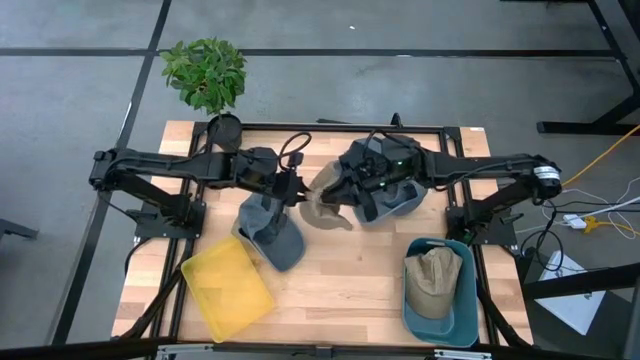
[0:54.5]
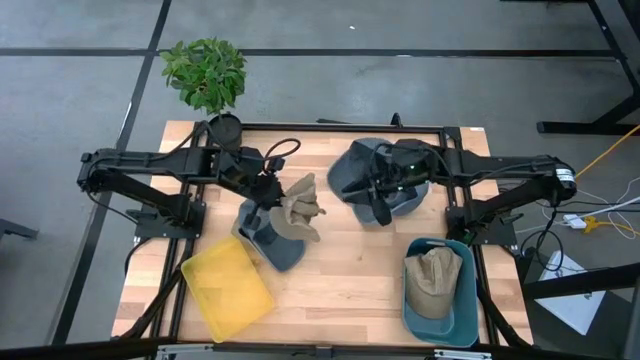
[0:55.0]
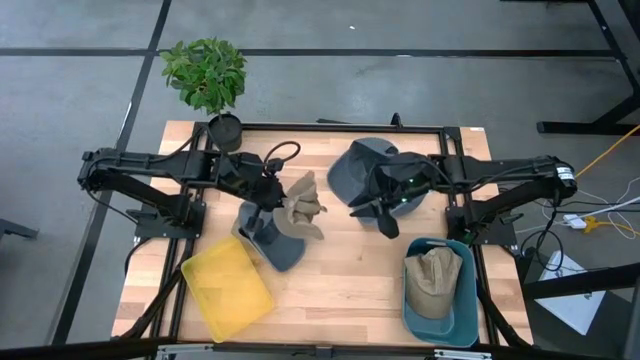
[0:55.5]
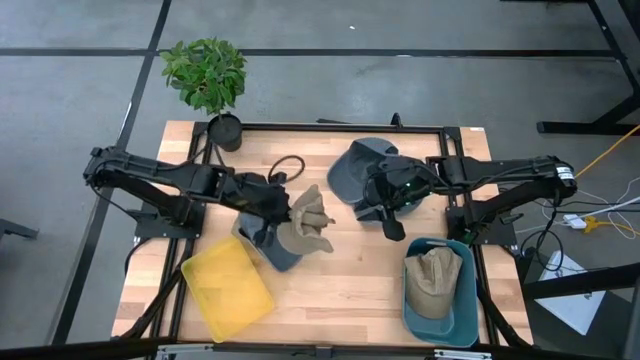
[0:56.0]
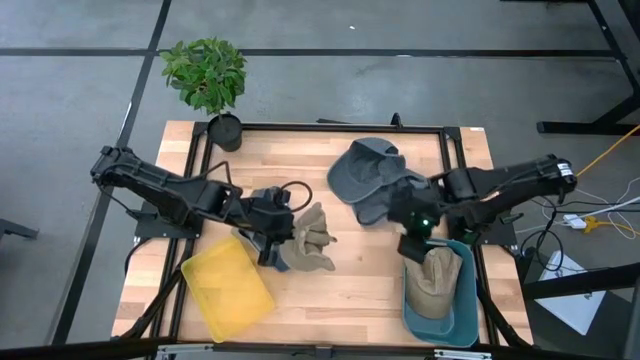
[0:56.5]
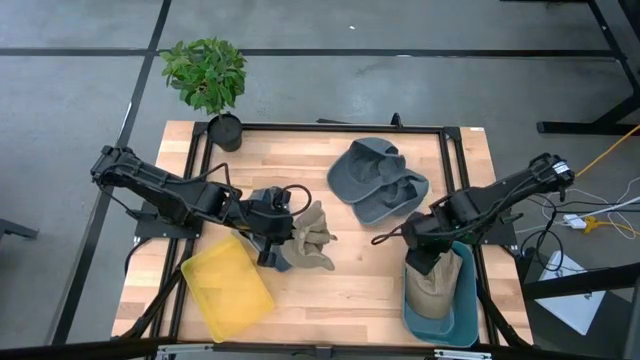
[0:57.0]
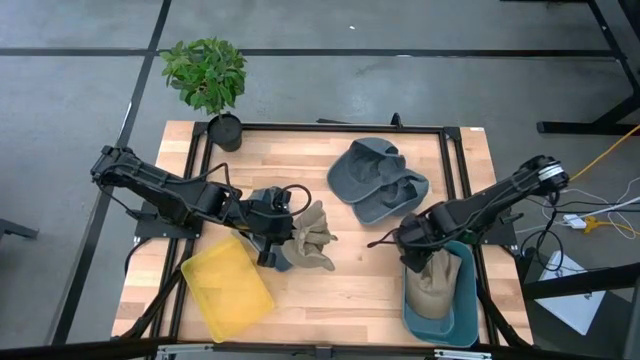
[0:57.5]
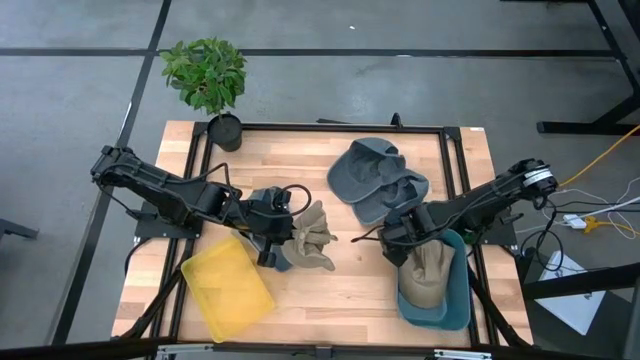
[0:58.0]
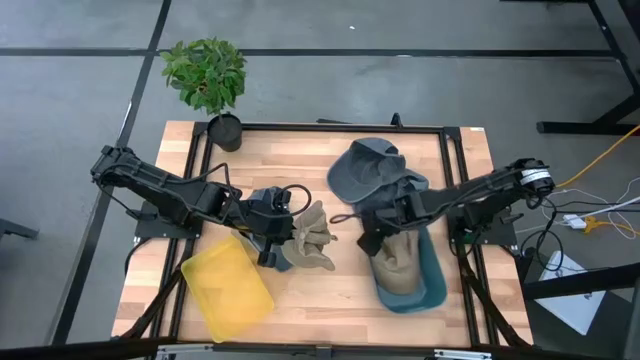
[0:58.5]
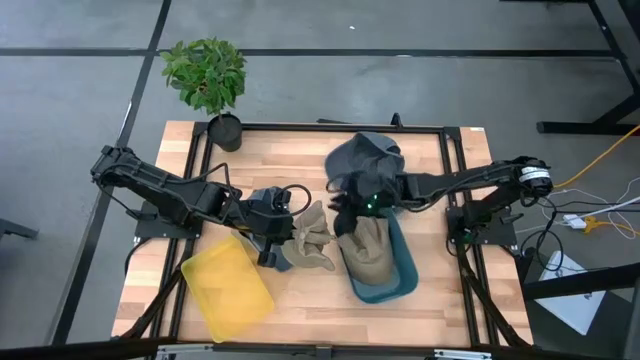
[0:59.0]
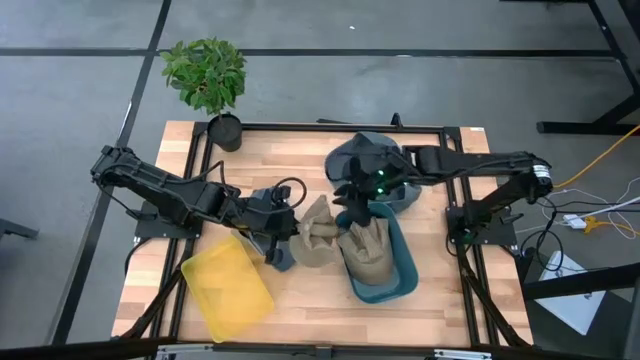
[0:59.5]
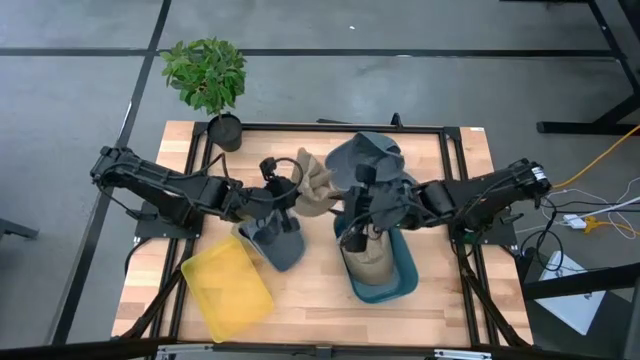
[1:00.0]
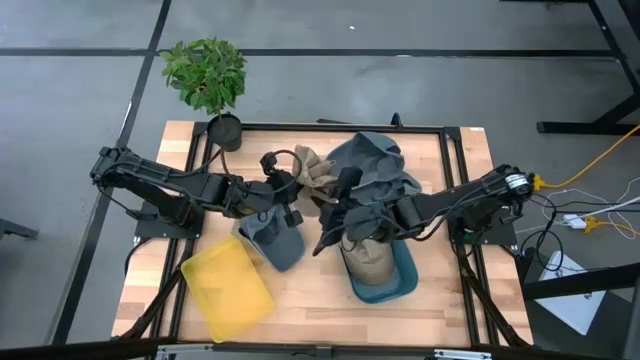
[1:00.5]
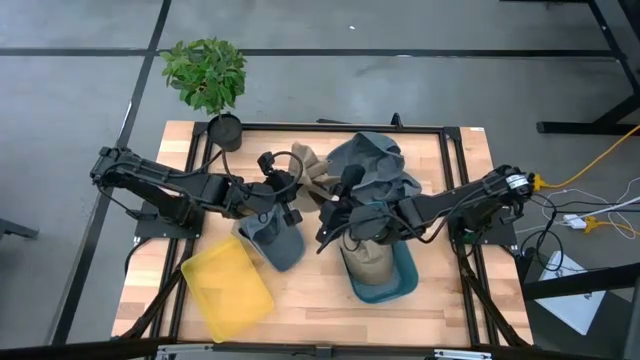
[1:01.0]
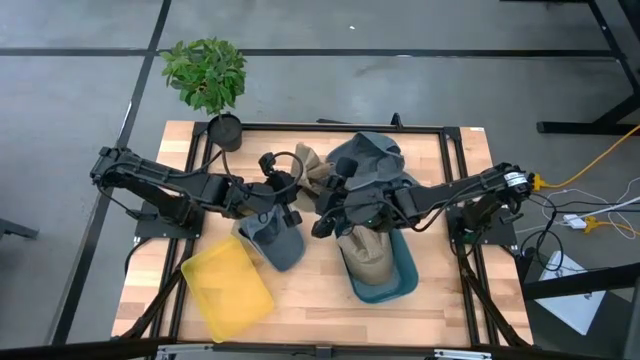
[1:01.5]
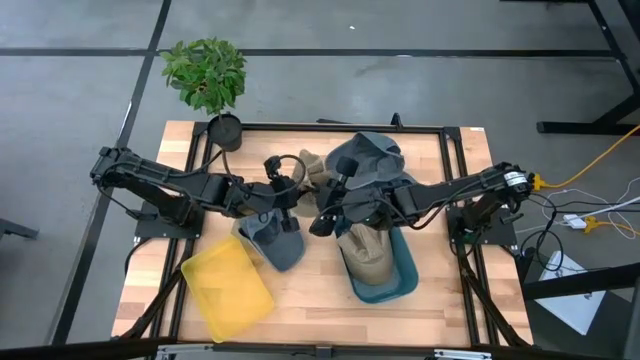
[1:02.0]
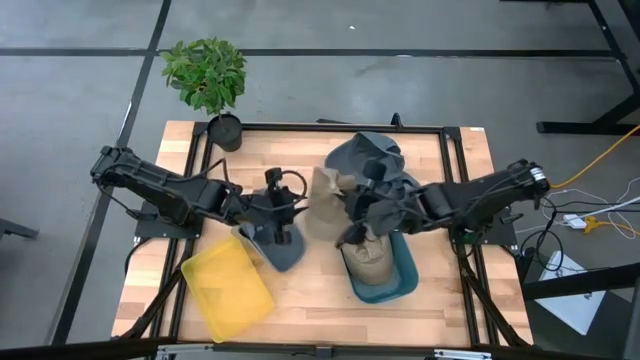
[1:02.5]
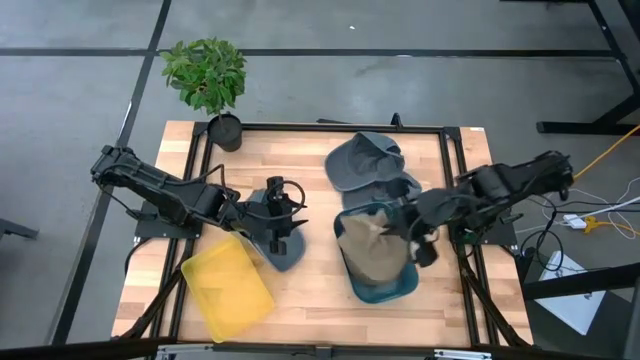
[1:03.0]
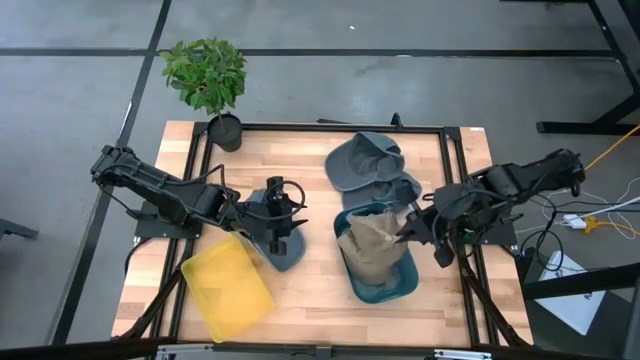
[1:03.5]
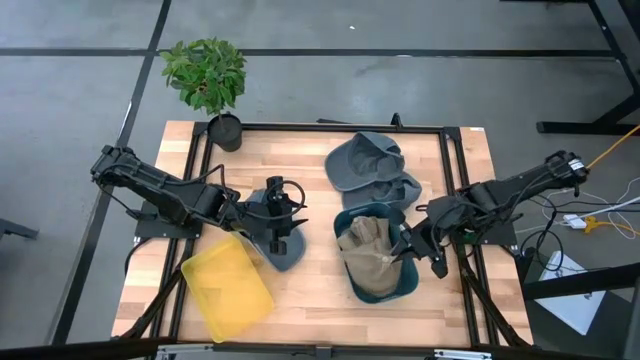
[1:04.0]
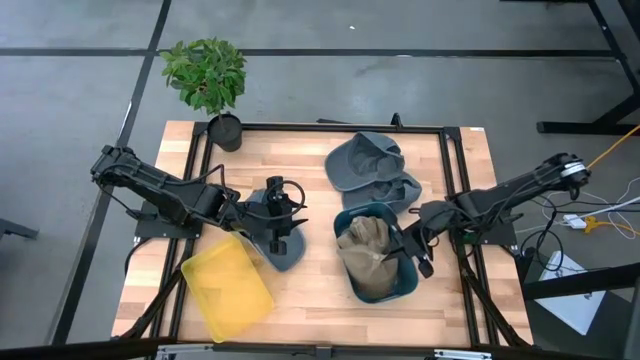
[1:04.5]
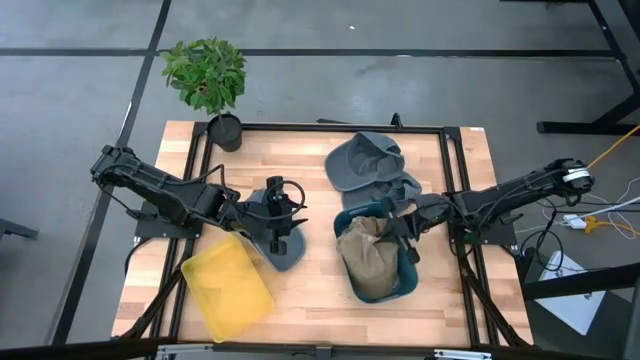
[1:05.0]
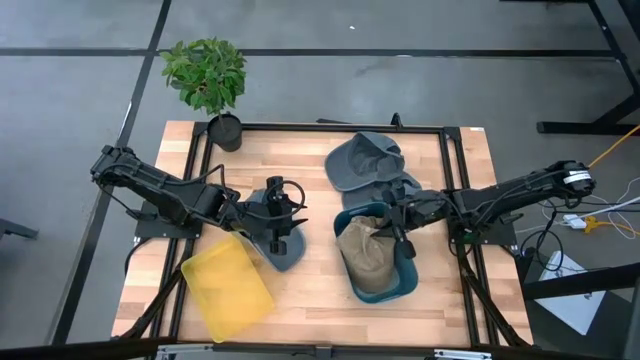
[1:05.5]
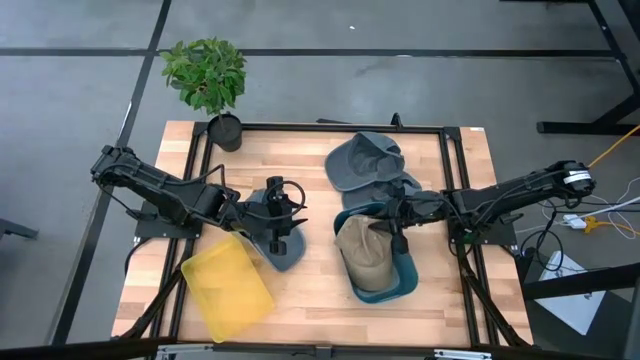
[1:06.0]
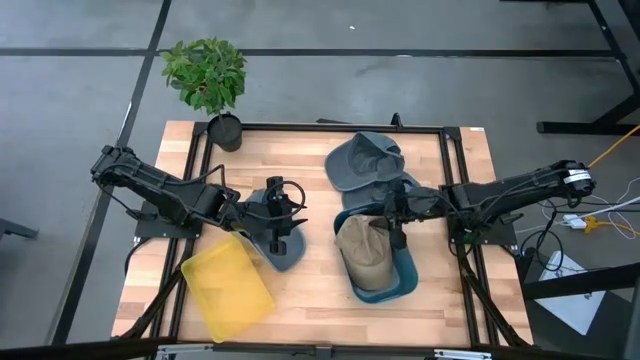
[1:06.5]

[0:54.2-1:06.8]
Task: Pick & Place hat
Put the right brown cap into the blue bin

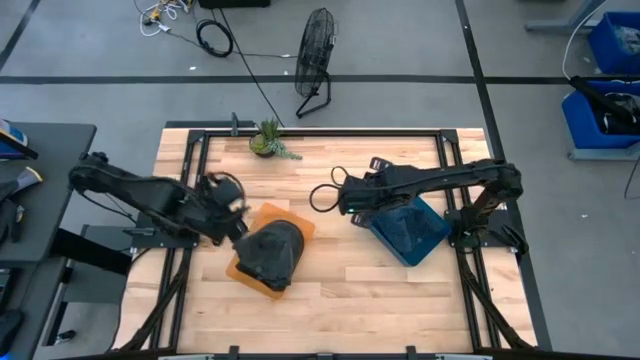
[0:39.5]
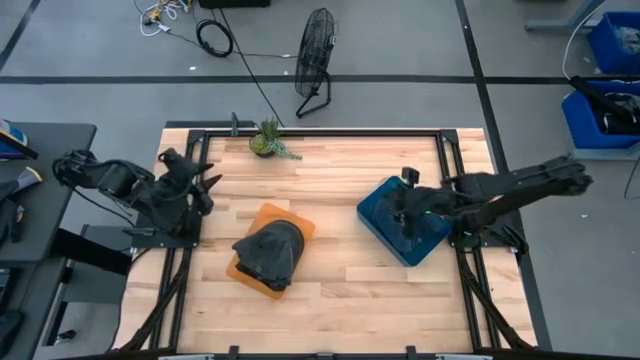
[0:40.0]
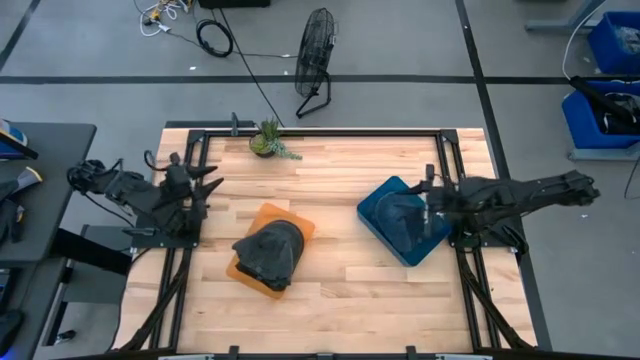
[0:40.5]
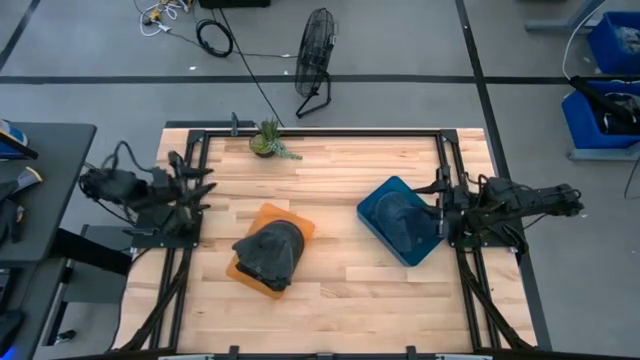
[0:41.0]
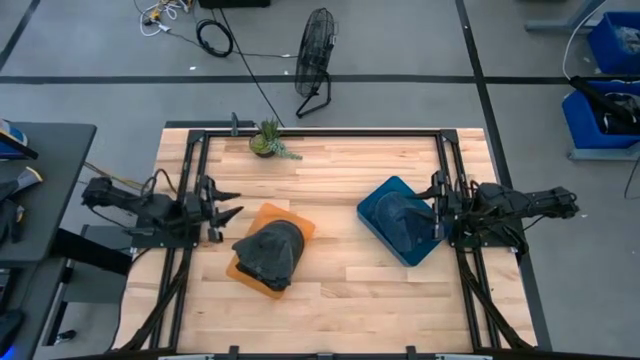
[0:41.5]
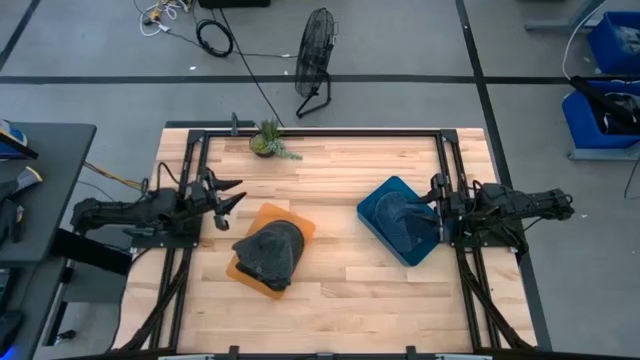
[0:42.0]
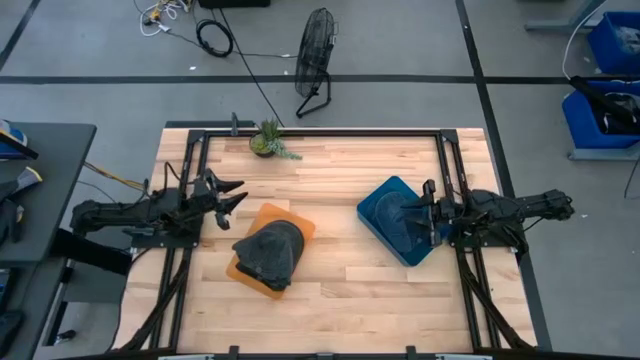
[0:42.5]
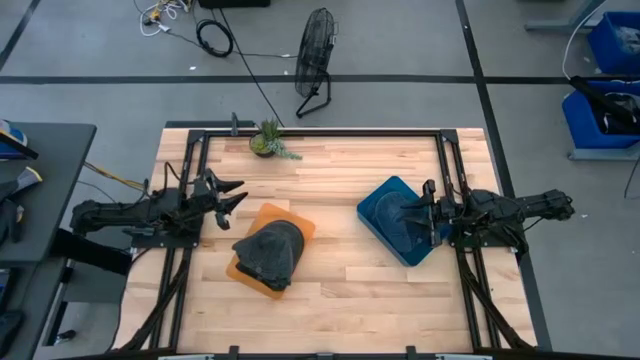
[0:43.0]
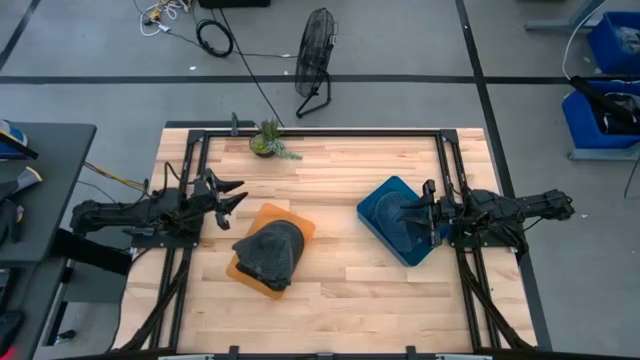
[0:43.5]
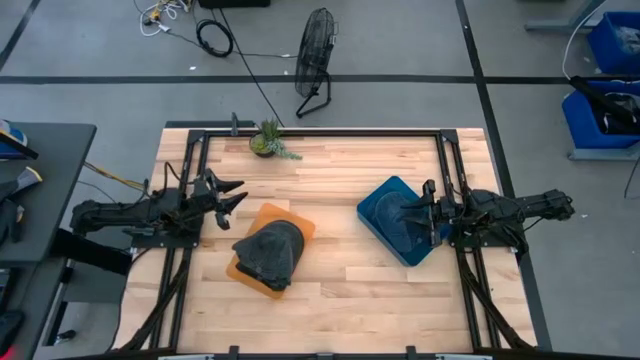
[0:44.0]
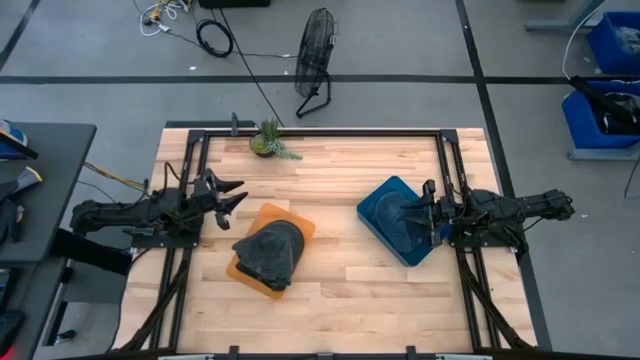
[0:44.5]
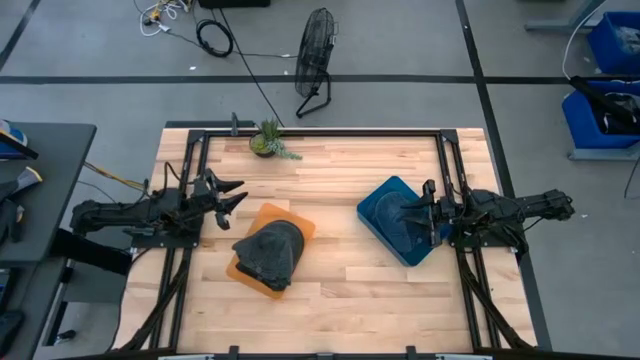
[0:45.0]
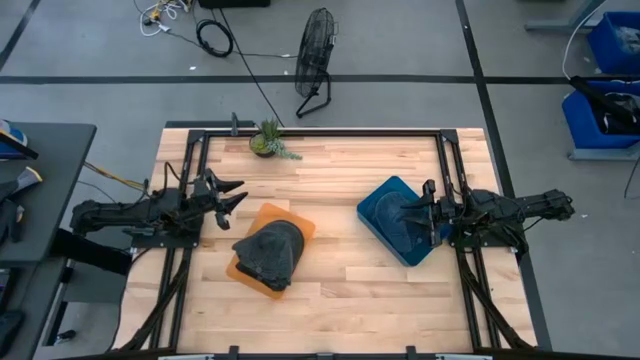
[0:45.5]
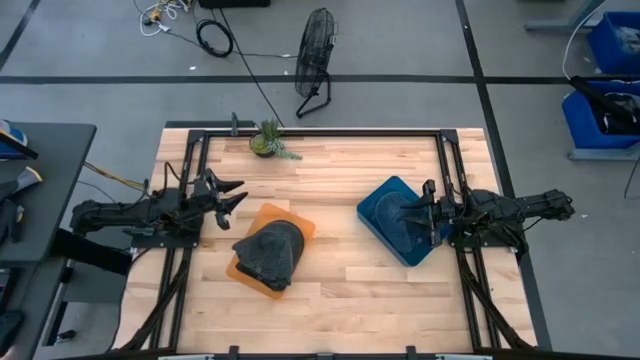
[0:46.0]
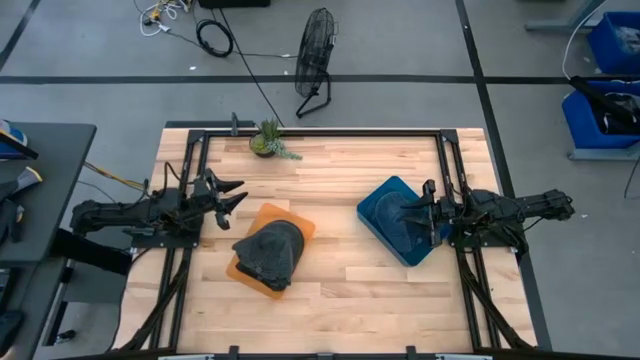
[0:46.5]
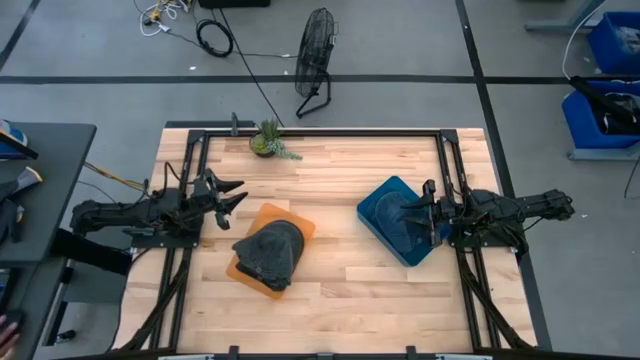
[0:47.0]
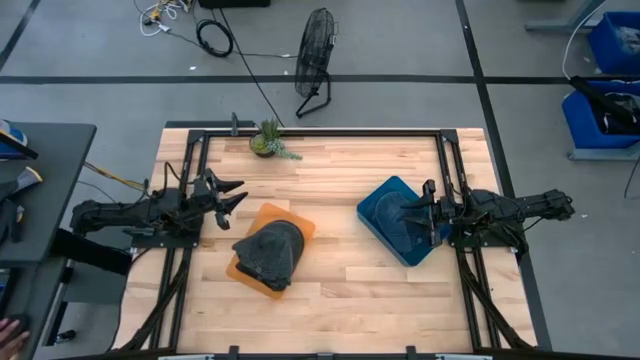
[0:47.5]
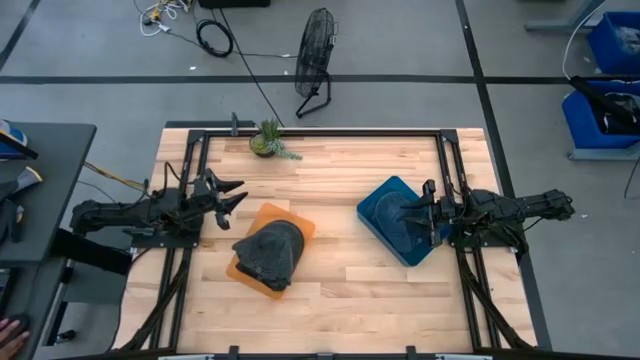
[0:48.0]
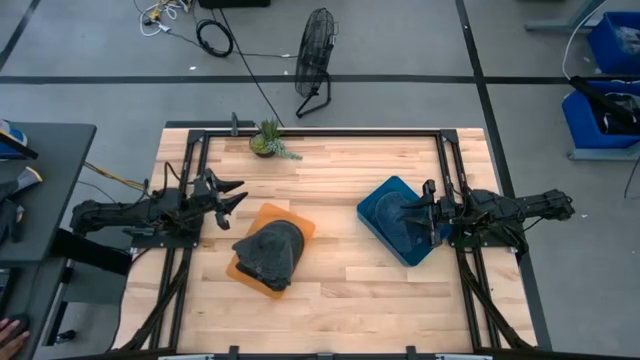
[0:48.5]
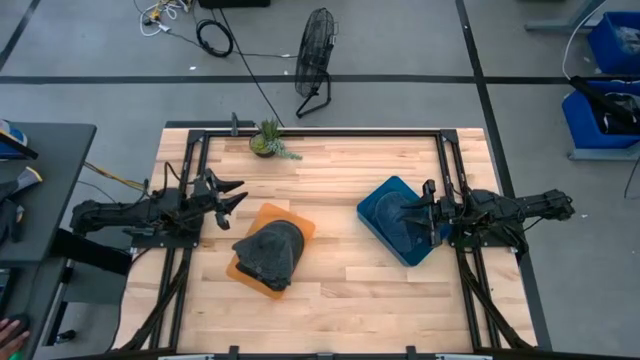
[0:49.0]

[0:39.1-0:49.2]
Task: Pick & Place hat
Return to Home Position
